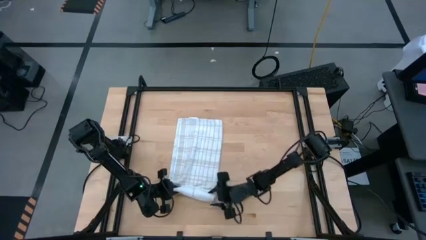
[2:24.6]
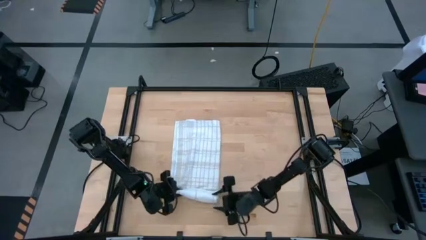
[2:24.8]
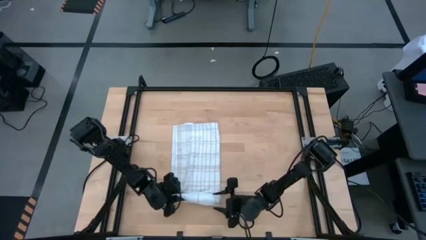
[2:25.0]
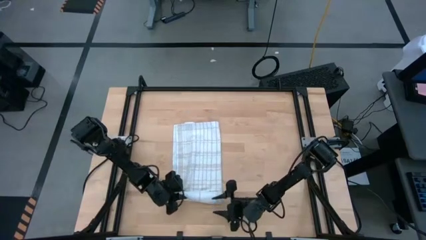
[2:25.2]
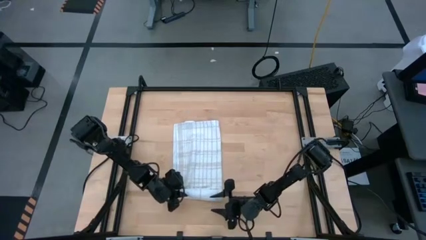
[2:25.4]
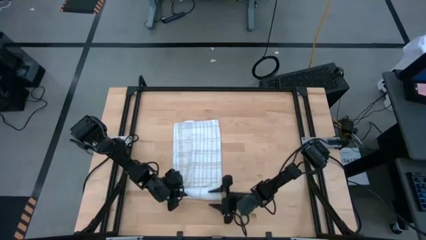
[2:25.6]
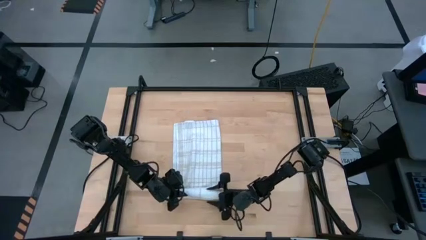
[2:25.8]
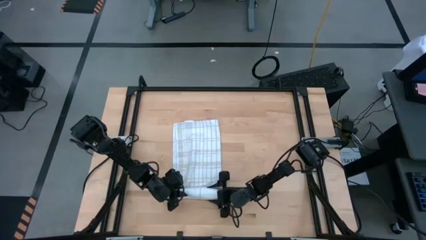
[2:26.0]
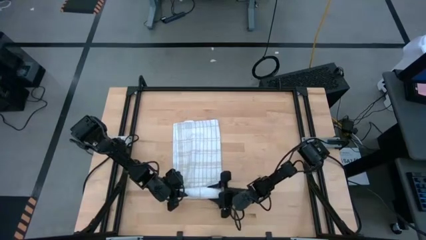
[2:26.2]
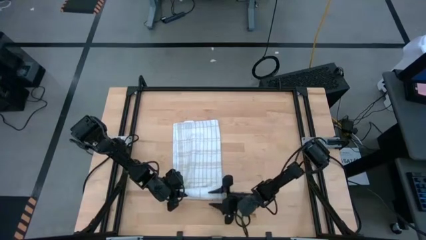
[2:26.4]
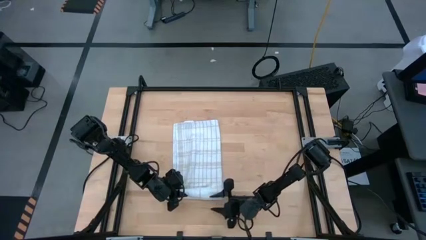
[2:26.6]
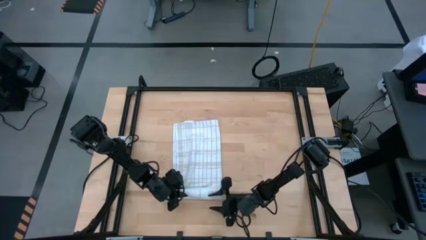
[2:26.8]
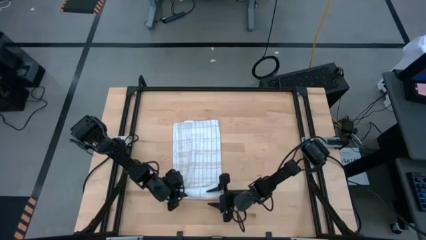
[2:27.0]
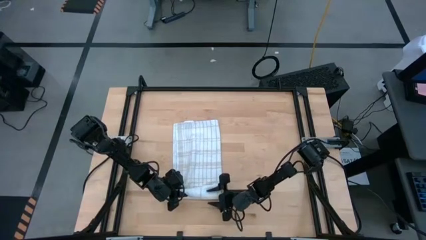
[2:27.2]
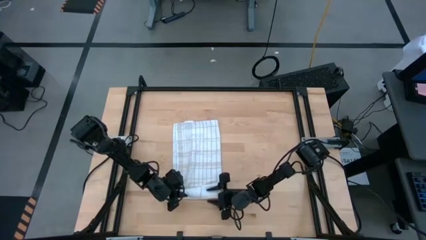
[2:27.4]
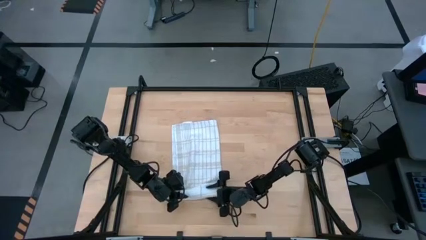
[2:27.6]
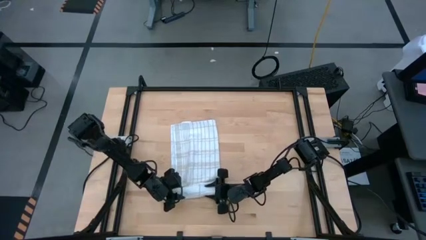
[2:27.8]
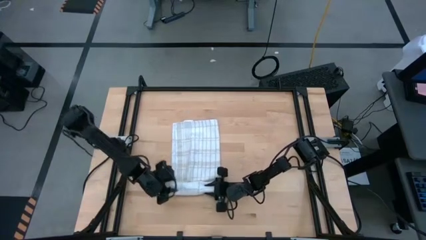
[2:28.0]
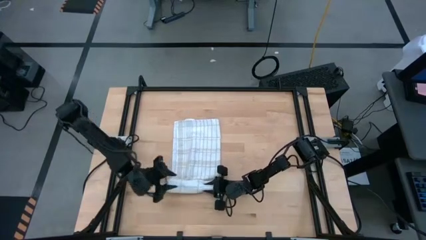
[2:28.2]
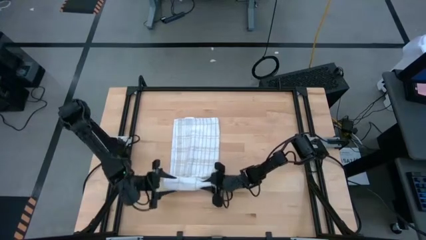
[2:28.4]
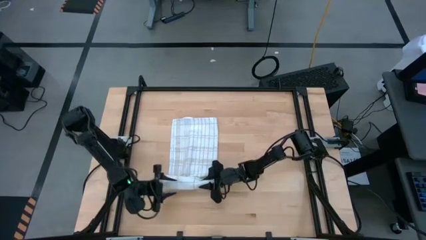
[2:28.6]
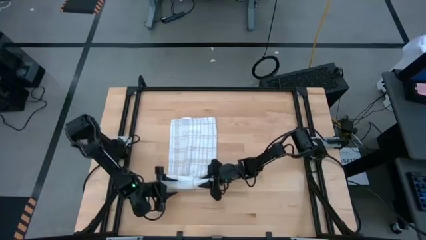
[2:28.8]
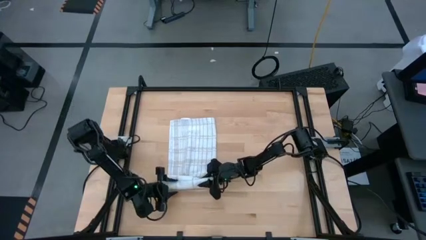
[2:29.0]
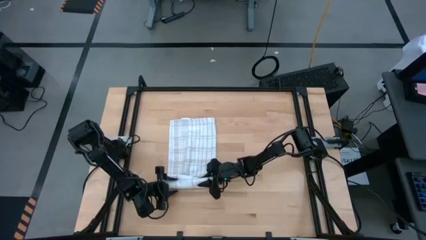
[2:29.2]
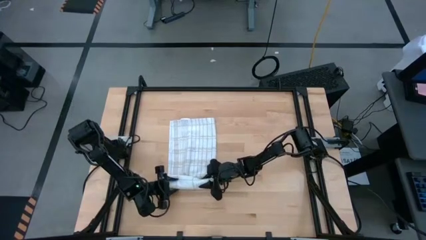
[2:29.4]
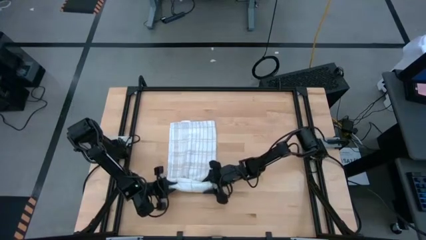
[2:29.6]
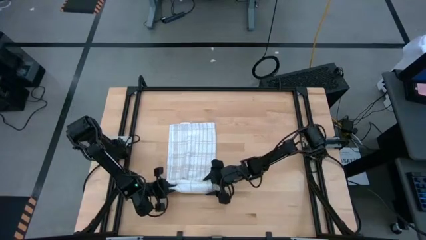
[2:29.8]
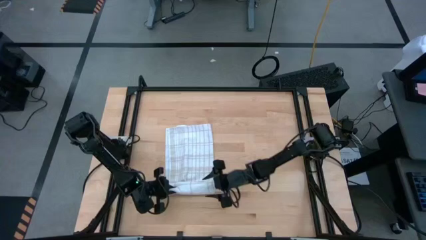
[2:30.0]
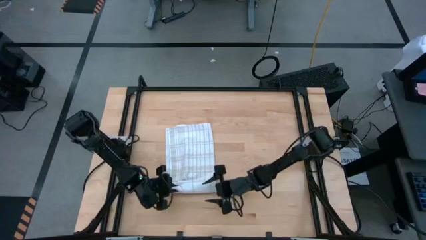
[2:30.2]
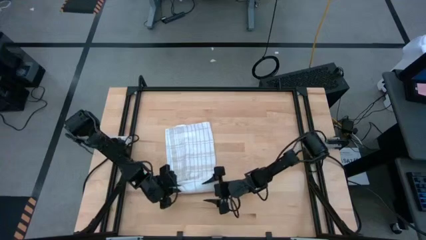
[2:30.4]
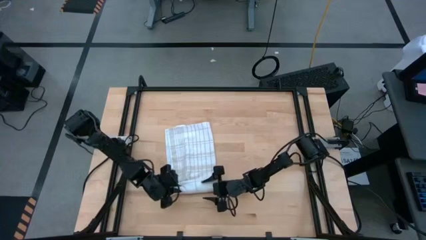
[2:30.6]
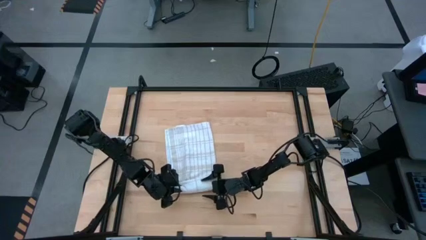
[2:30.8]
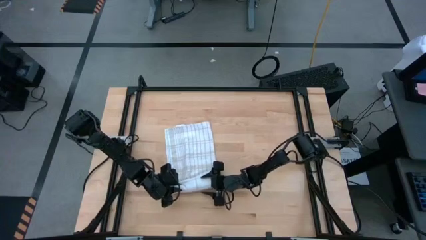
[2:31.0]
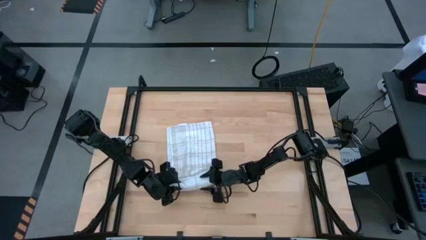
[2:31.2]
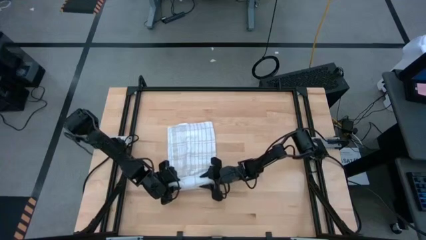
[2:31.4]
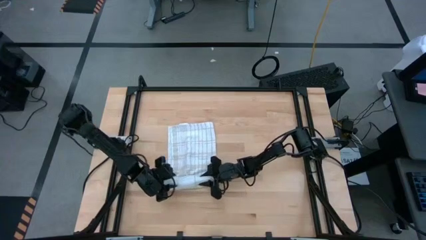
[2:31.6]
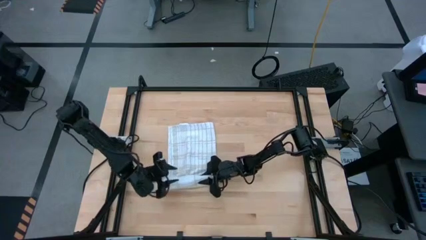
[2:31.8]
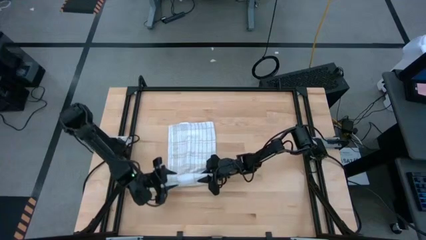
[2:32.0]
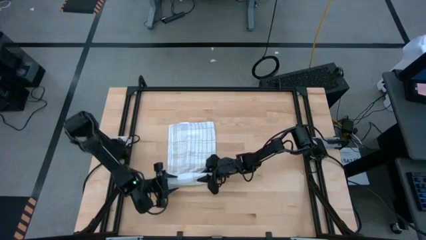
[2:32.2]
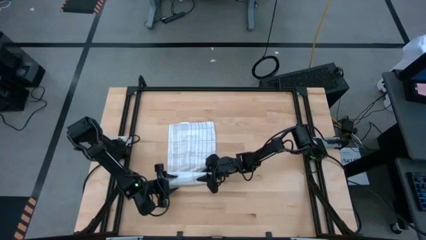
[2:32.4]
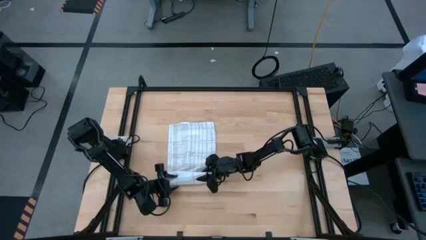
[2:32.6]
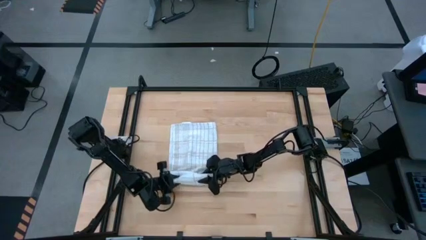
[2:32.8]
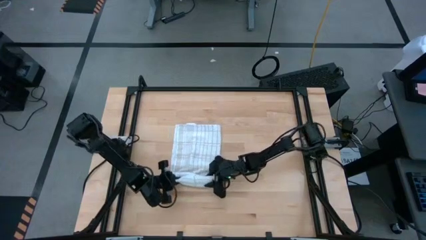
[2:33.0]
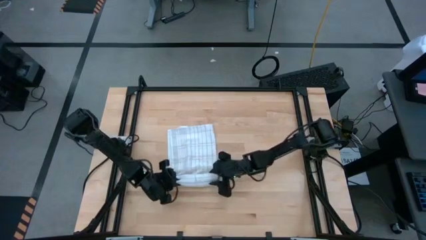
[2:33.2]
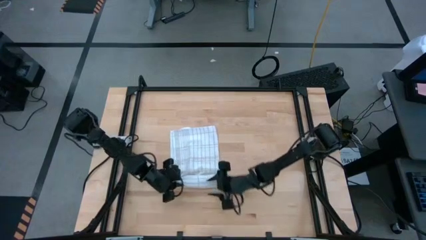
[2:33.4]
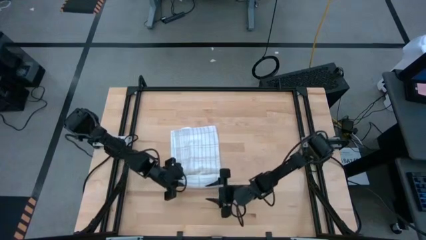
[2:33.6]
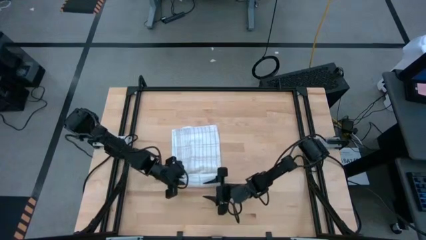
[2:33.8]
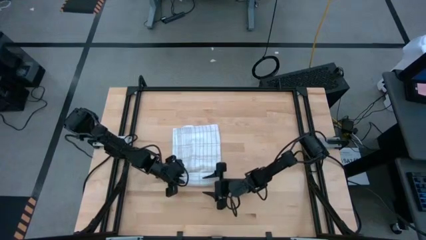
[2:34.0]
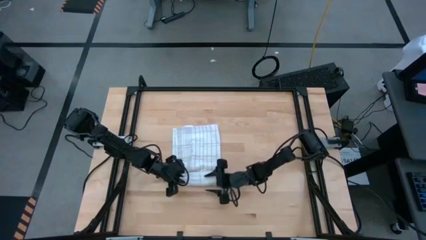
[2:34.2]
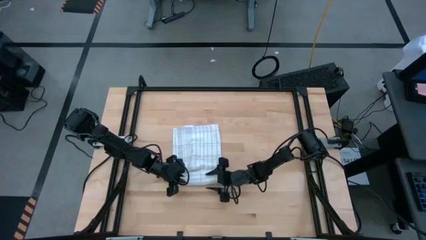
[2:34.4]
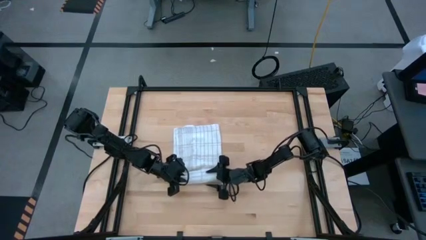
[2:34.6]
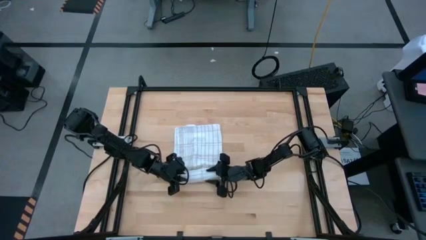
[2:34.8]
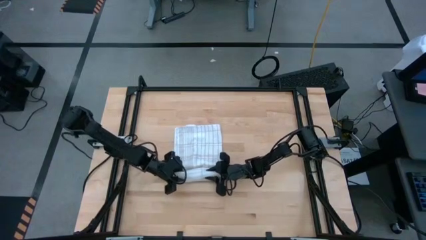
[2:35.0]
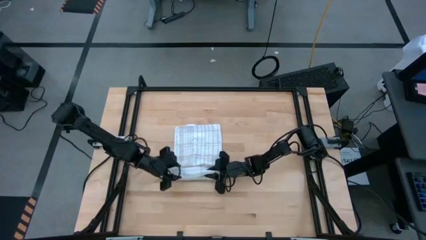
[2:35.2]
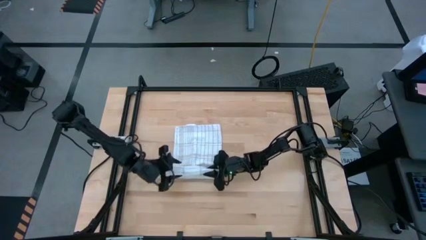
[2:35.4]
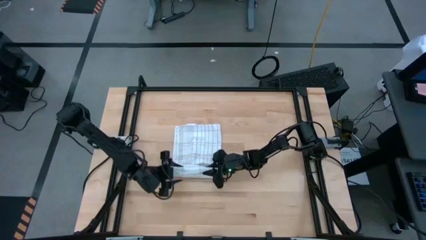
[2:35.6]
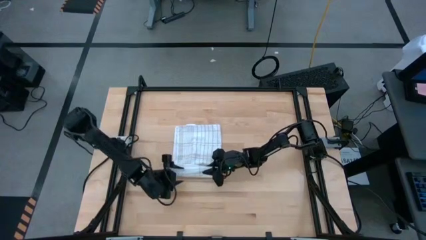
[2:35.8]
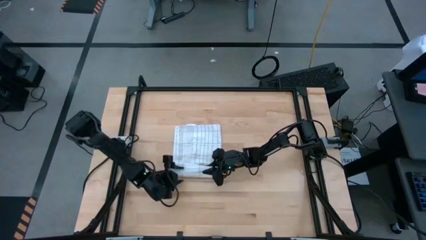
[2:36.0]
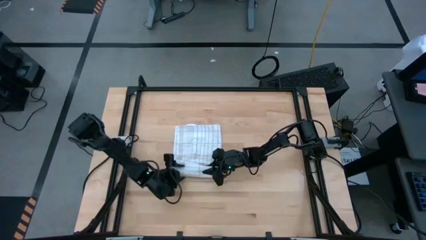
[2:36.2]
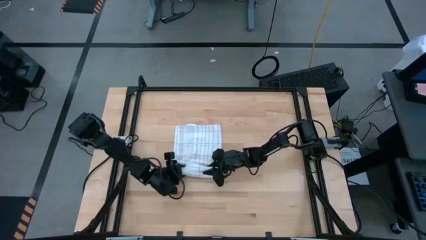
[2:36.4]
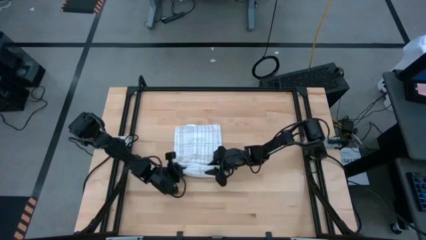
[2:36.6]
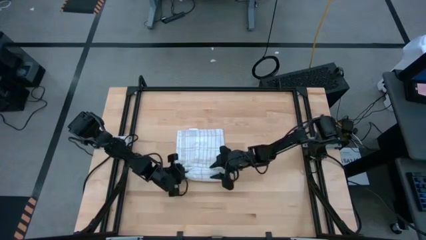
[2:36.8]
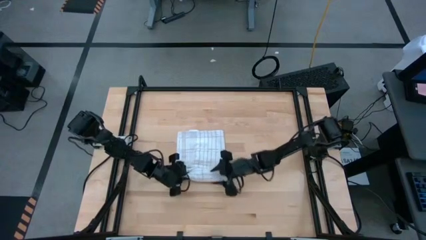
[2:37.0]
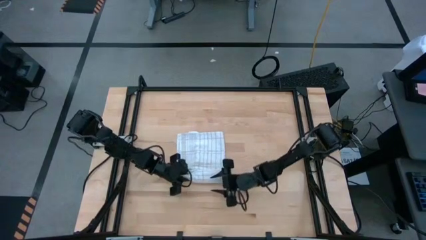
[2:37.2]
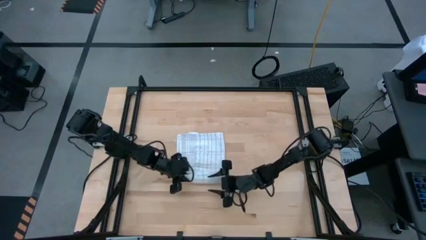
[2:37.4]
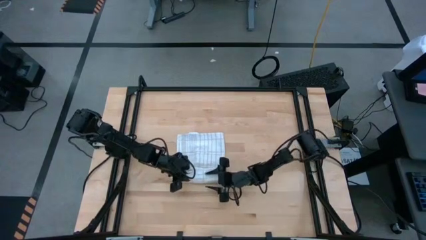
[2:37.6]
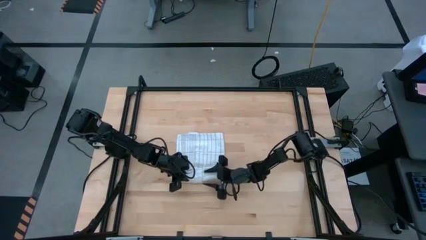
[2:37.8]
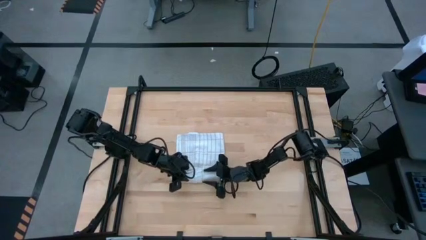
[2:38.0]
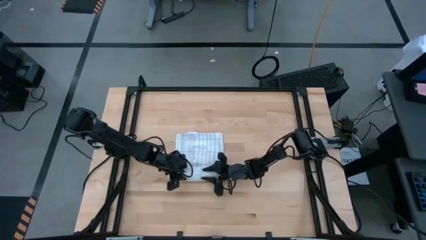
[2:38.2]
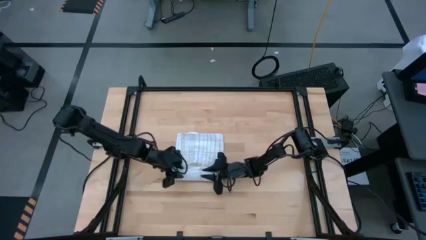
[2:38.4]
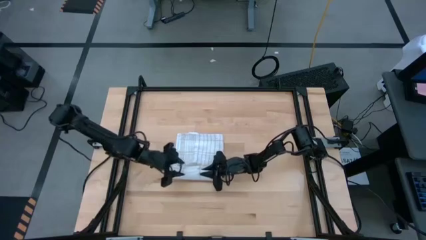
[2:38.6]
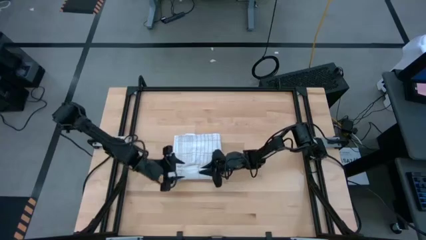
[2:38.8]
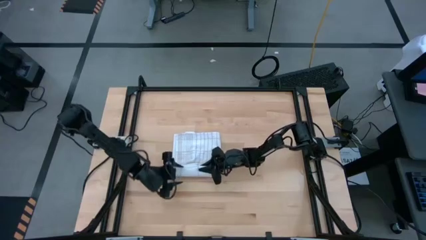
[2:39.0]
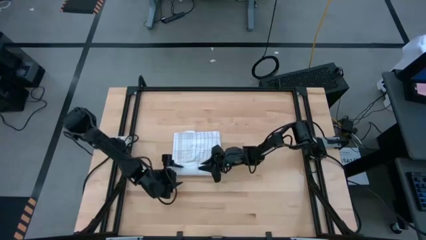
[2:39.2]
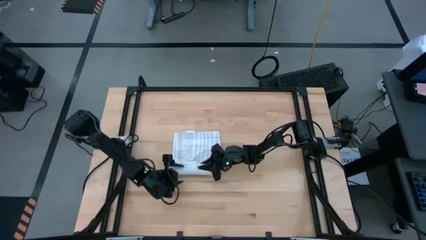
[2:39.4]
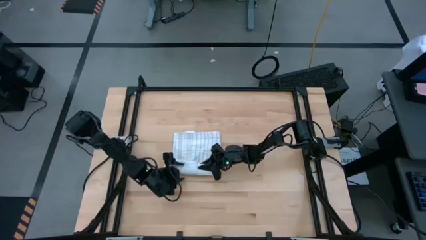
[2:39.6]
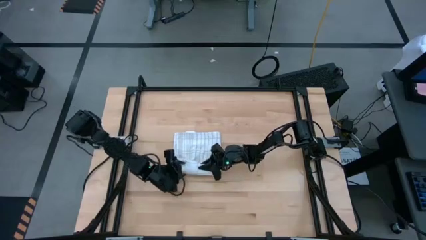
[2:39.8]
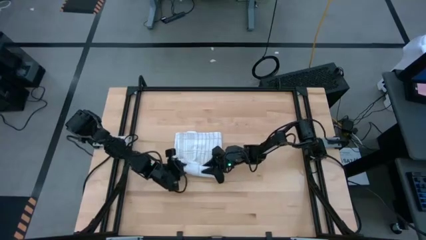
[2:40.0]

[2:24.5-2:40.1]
Task: Roll towel
Roll the white towel

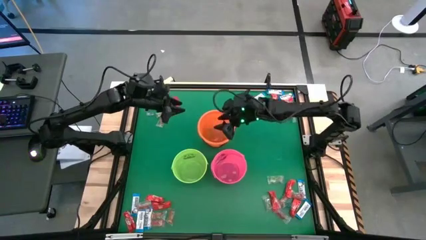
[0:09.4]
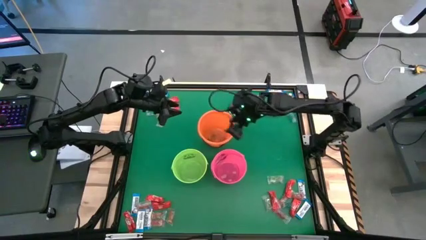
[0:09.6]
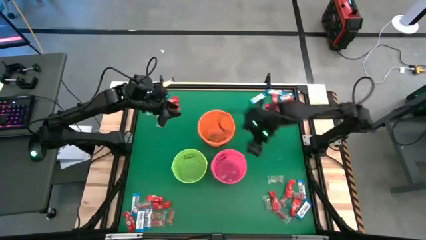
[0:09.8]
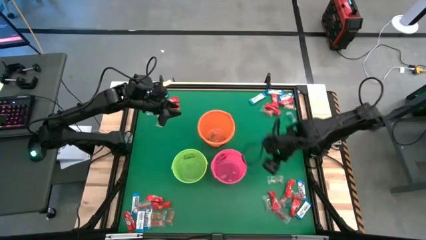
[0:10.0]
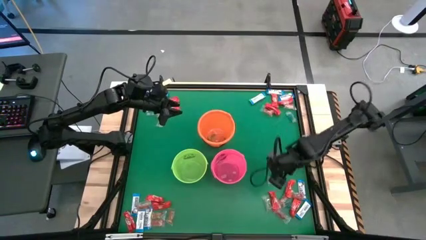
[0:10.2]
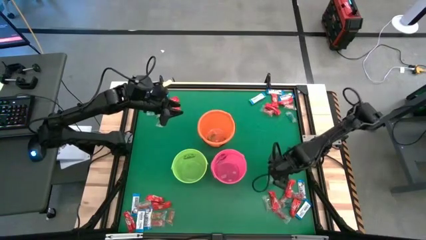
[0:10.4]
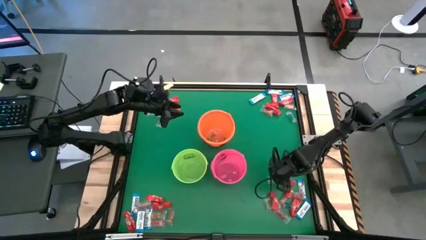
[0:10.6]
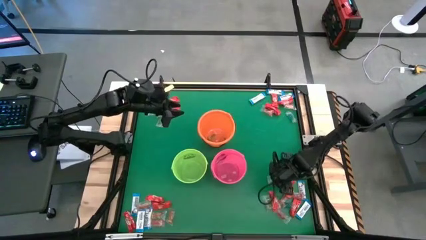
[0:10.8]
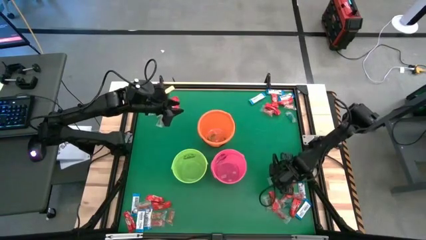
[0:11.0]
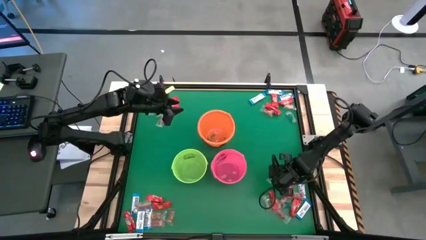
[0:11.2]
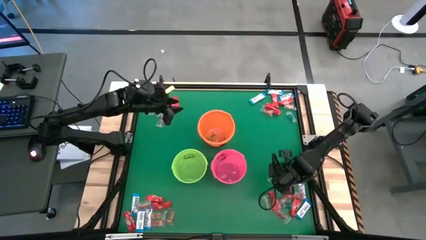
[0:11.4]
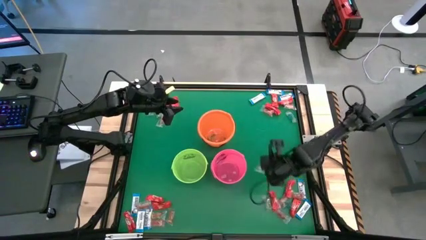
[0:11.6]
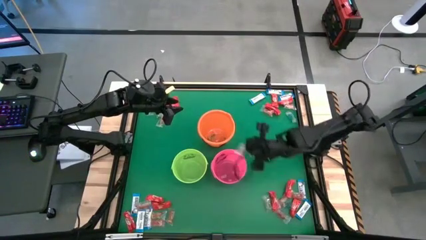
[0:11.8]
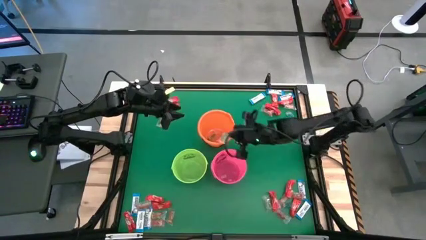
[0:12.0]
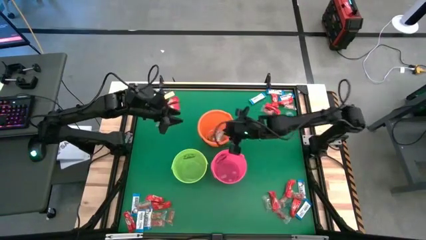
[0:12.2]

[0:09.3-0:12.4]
Task: Sort candy by brand, put in halloween buckets
Put the green gummy into the orange bucket
